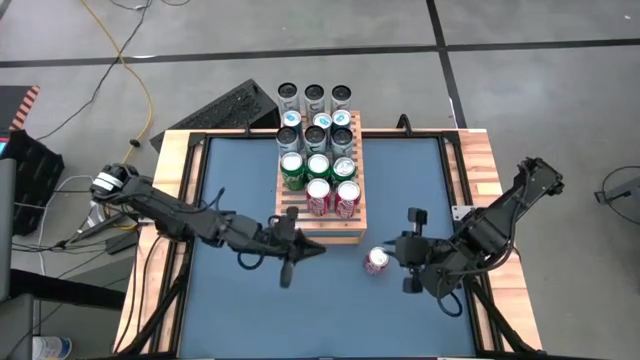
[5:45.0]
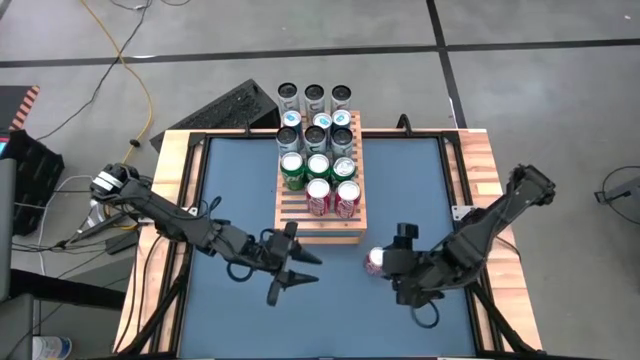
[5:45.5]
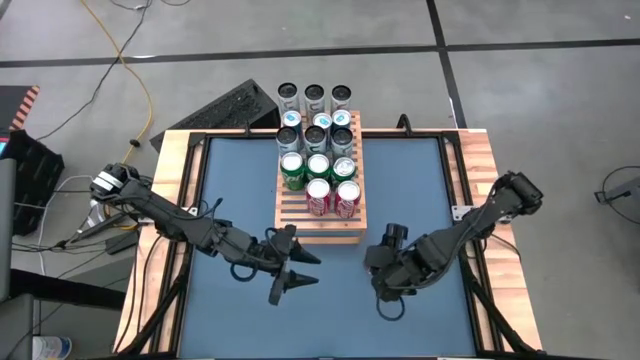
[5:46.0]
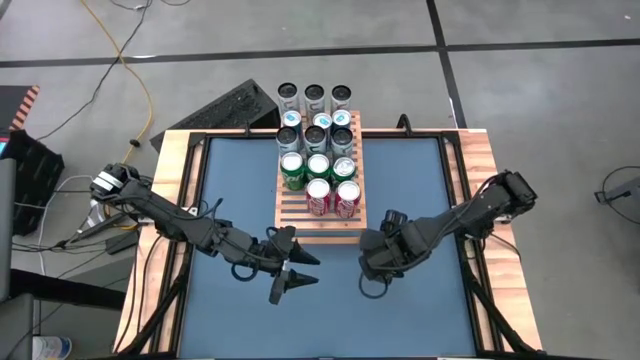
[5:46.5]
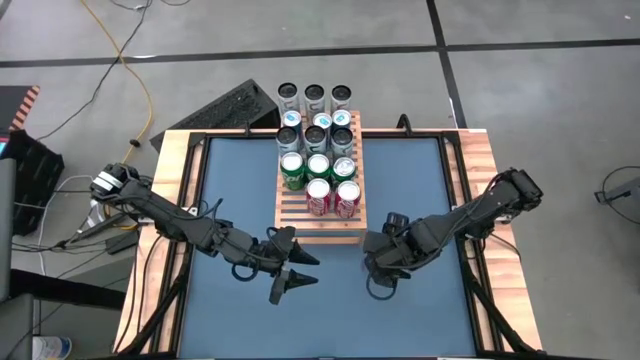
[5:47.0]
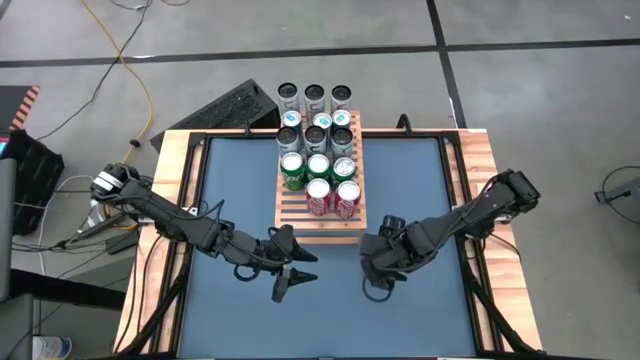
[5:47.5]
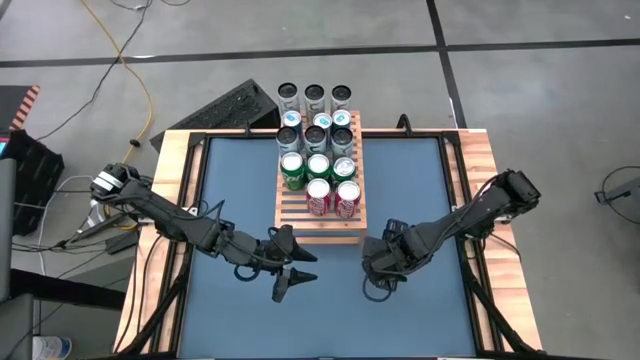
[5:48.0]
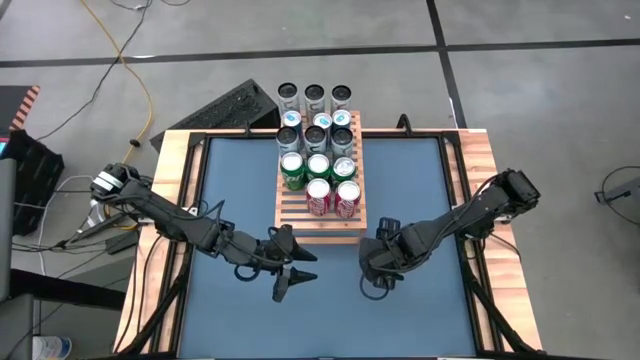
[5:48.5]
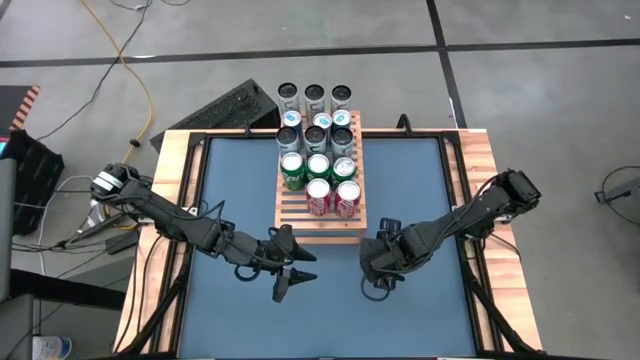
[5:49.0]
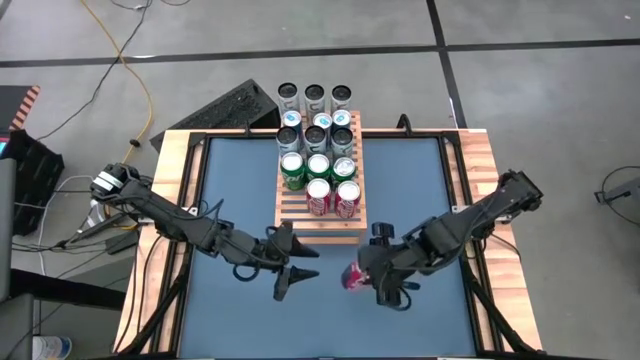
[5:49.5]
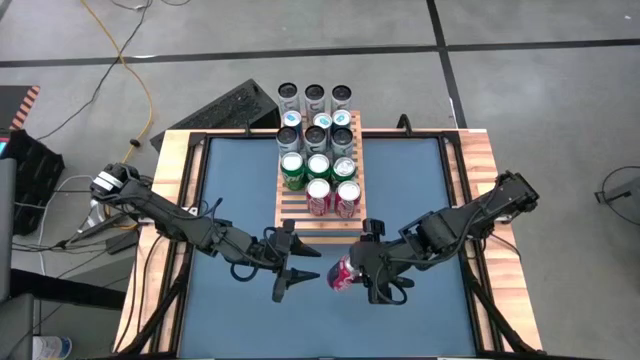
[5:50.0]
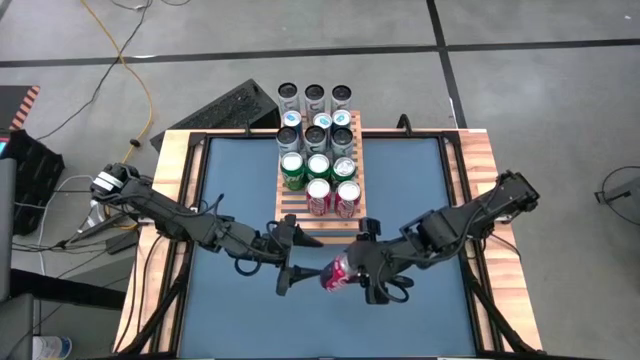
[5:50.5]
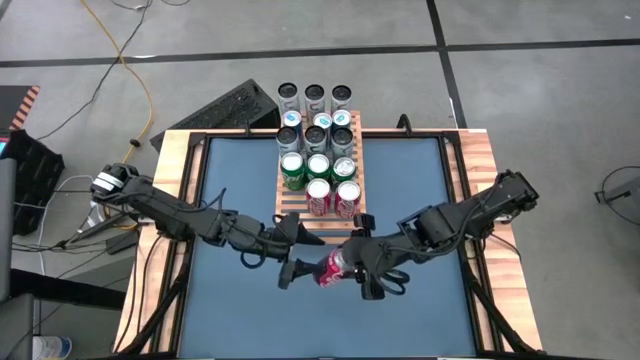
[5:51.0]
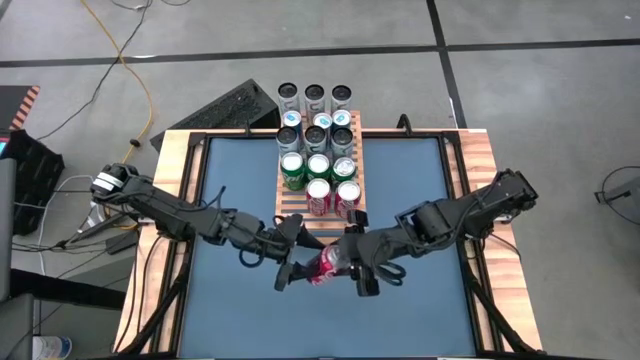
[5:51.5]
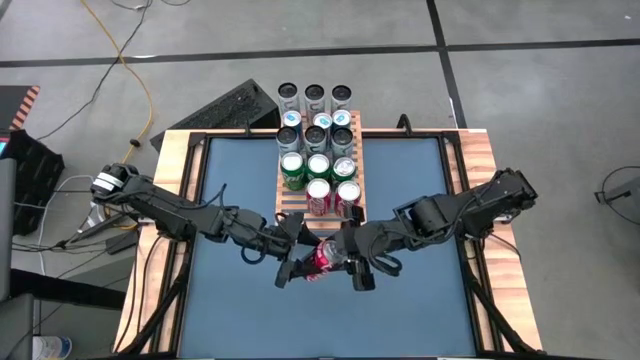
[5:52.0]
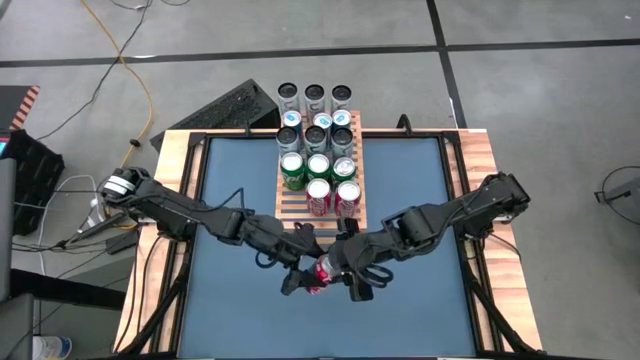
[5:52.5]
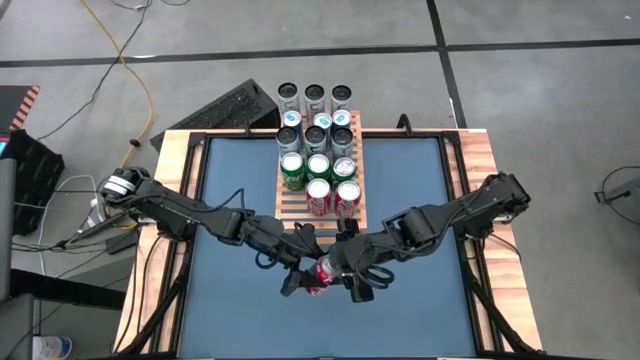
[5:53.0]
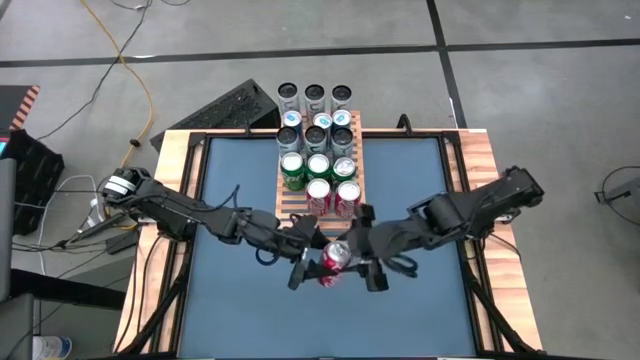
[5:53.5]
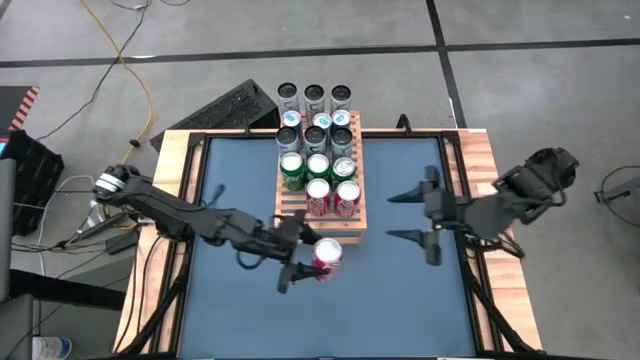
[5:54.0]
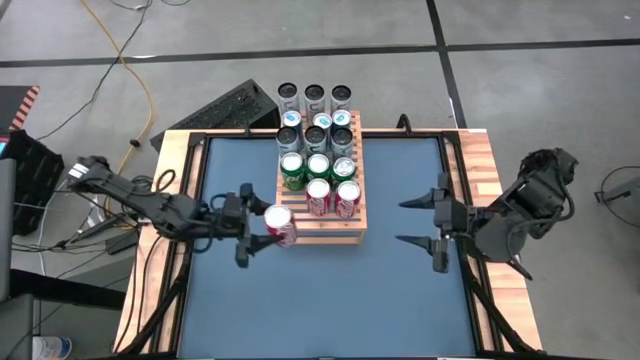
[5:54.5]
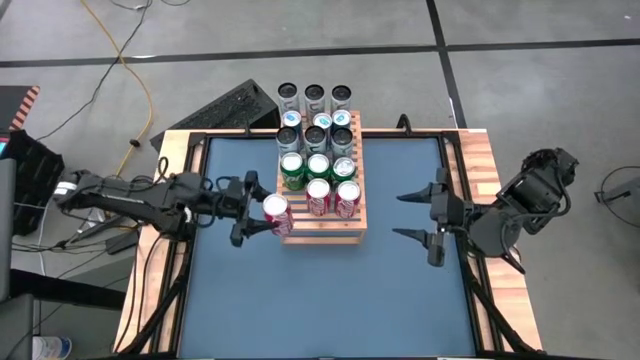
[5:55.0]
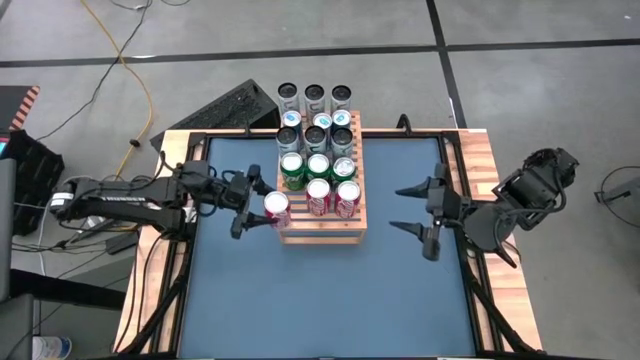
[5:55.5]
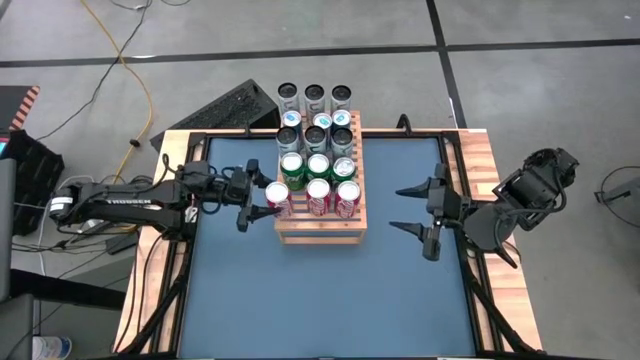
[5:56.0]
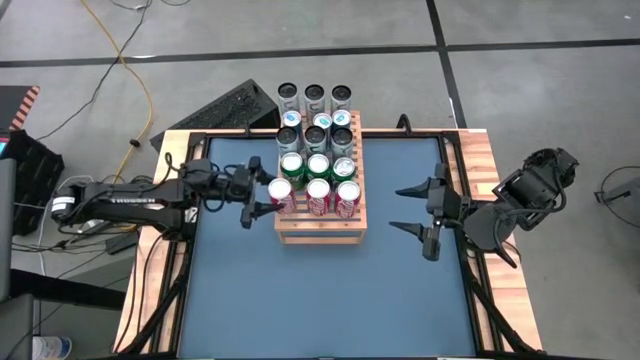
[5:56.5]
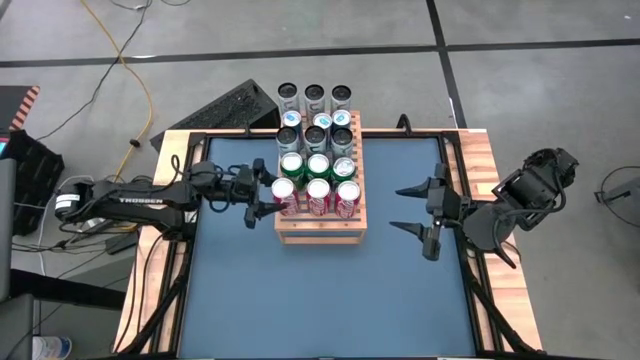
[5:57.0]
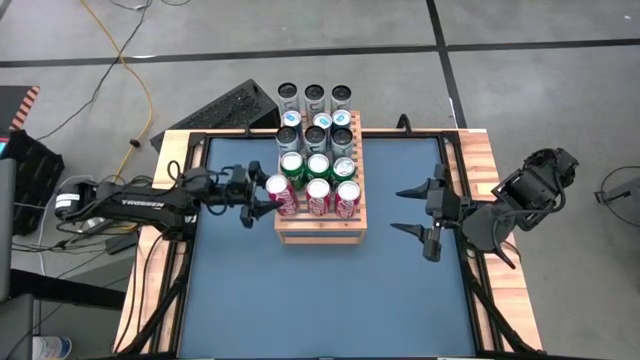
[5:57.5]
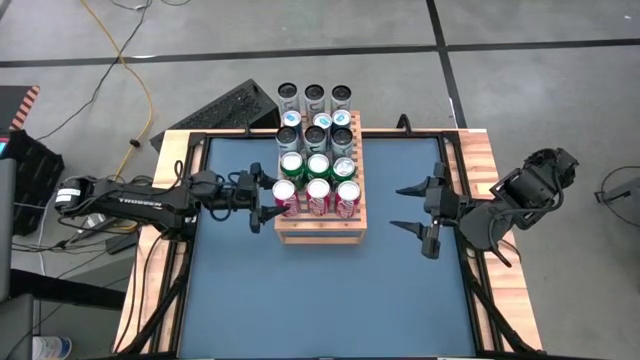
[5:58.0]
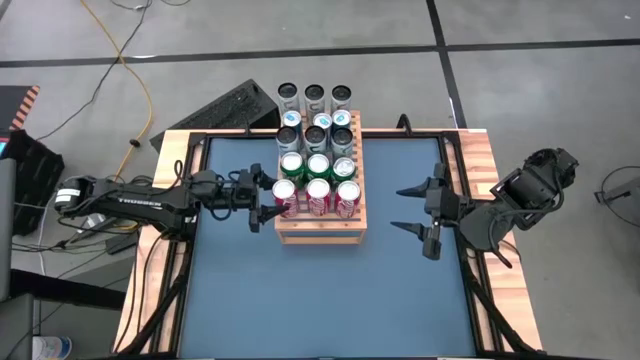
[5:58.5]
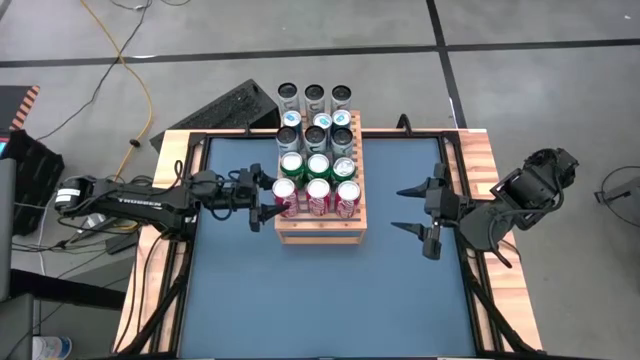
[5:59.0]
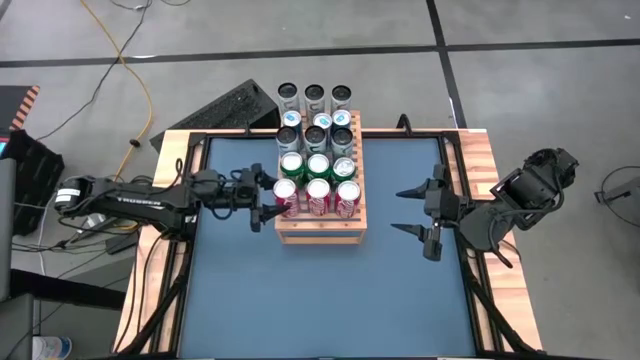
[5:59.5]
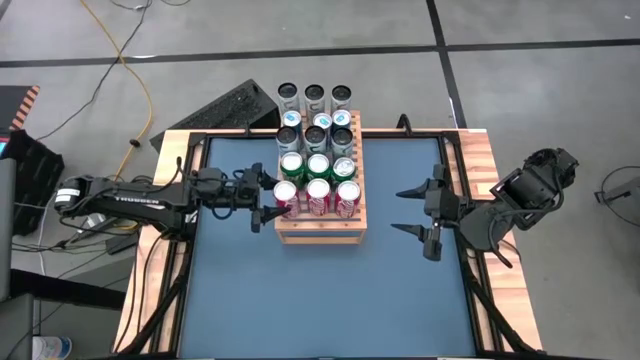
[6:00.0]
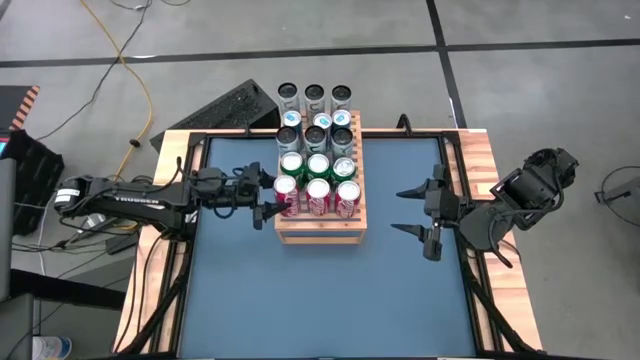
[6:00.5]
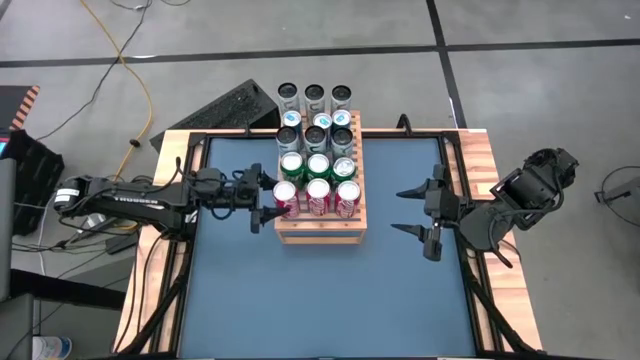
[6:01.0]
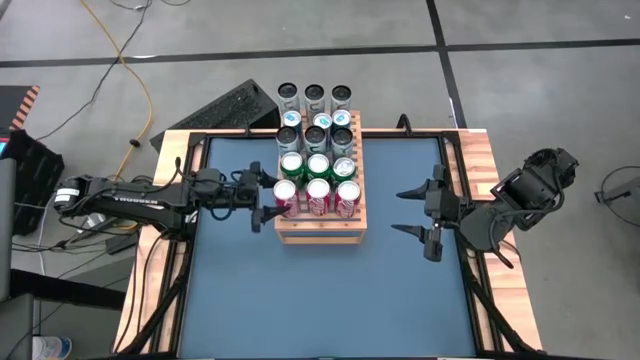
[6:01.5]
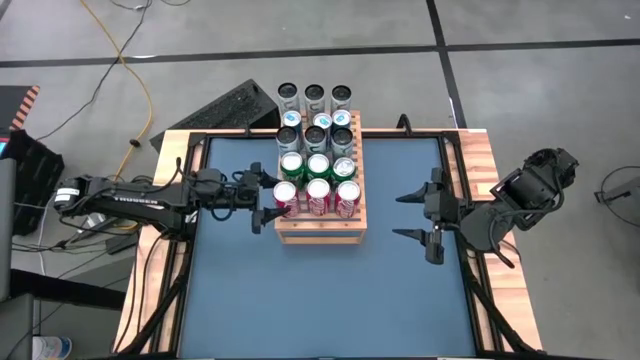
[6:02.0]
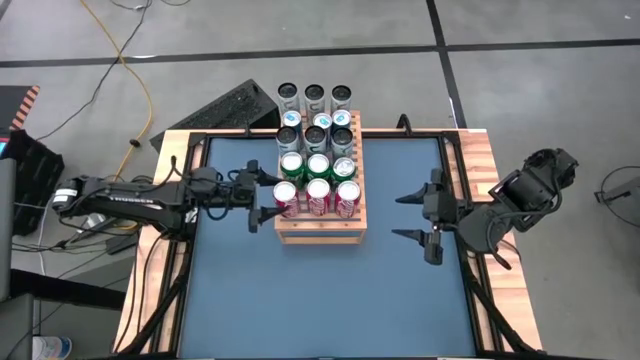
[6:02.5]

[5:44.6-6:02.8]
Task: Place canned beverage on shelf
Put the red soda can on the shelf aligned with the other red soda cans
